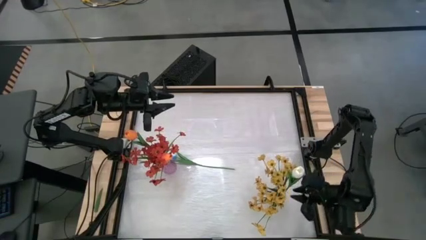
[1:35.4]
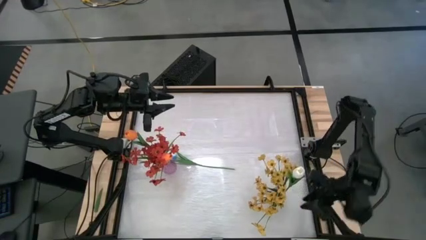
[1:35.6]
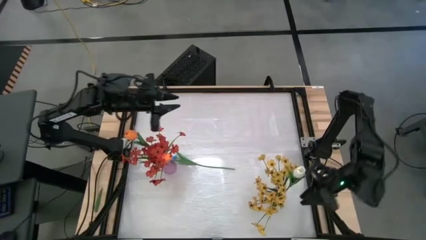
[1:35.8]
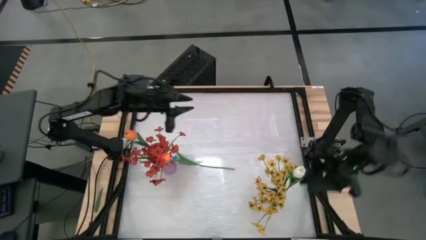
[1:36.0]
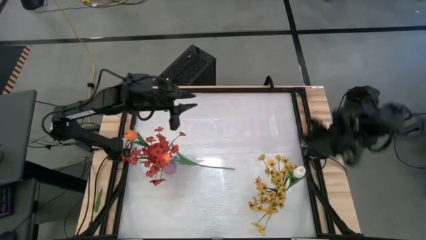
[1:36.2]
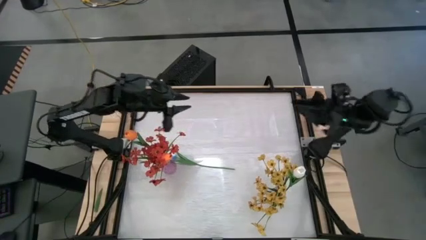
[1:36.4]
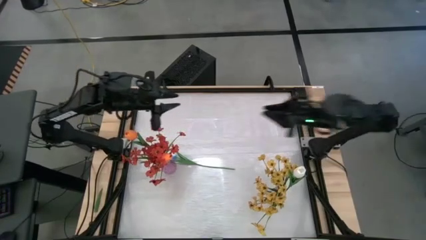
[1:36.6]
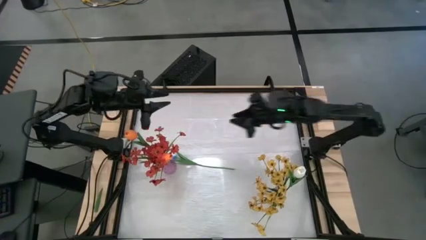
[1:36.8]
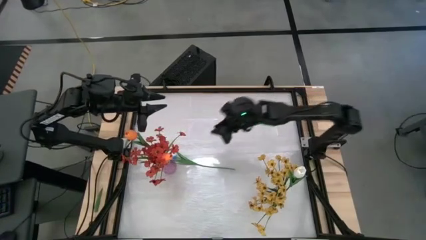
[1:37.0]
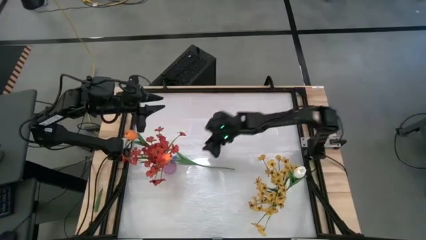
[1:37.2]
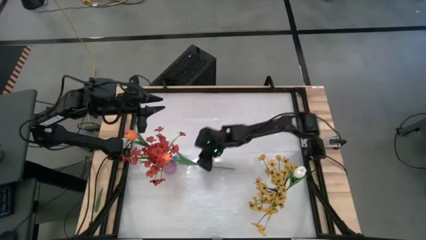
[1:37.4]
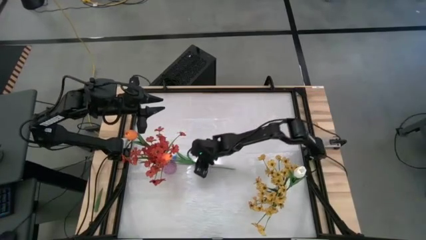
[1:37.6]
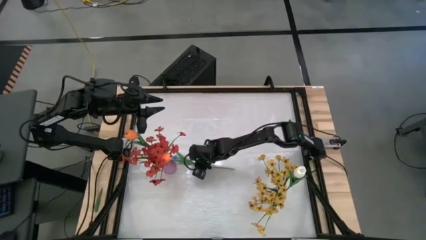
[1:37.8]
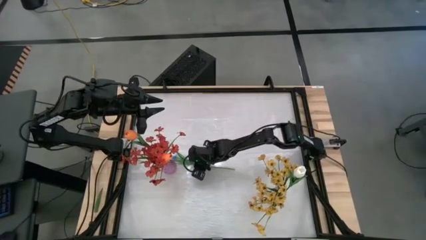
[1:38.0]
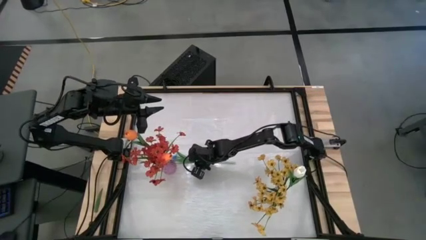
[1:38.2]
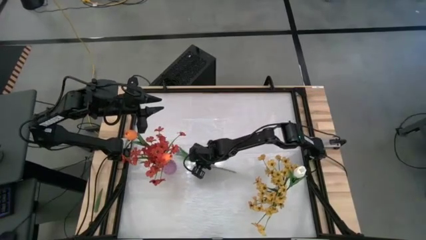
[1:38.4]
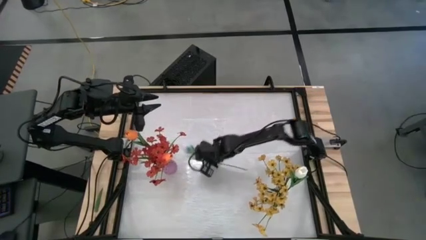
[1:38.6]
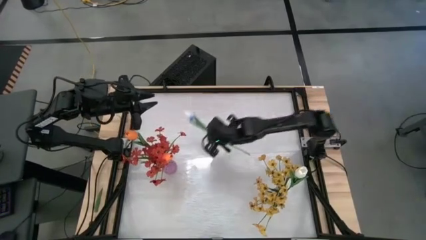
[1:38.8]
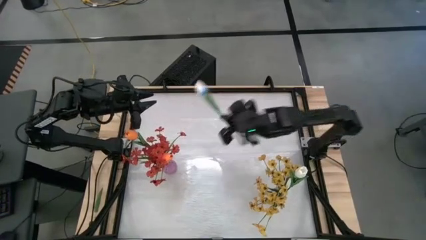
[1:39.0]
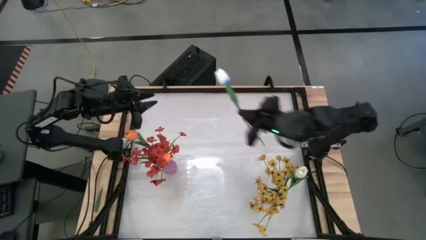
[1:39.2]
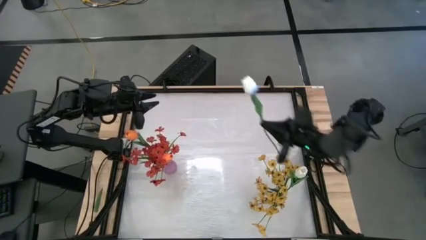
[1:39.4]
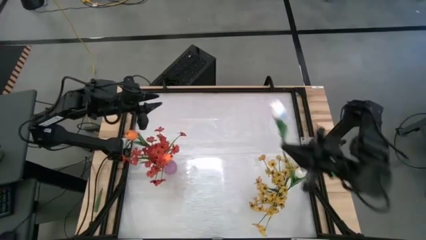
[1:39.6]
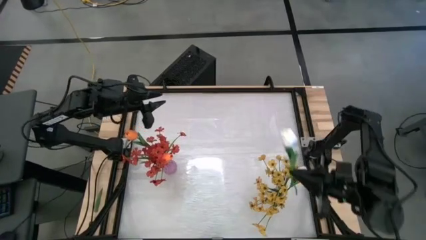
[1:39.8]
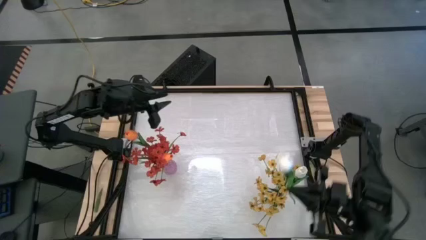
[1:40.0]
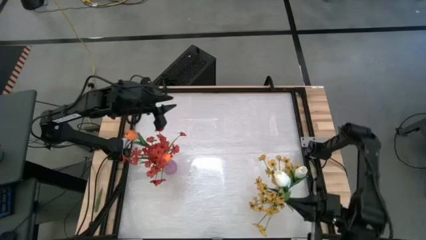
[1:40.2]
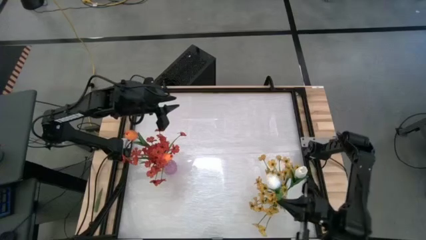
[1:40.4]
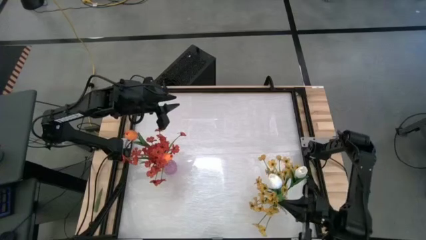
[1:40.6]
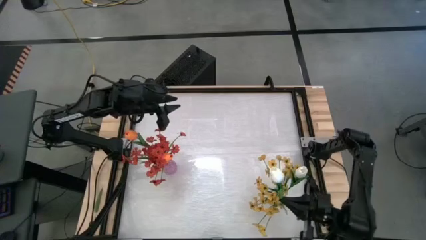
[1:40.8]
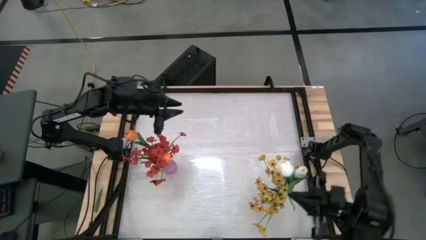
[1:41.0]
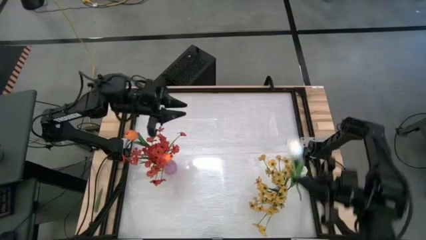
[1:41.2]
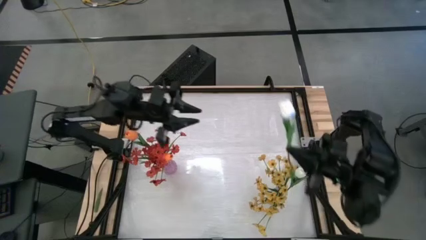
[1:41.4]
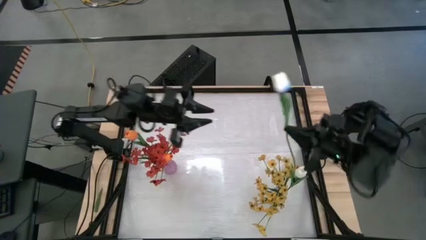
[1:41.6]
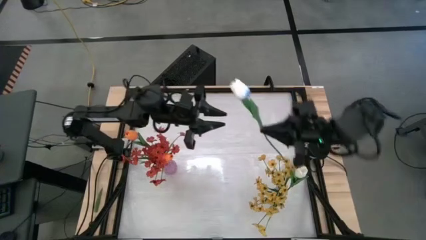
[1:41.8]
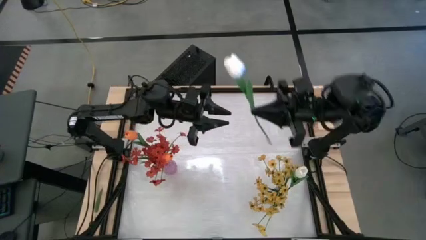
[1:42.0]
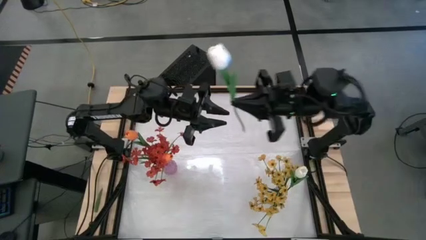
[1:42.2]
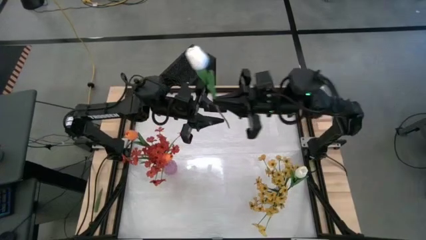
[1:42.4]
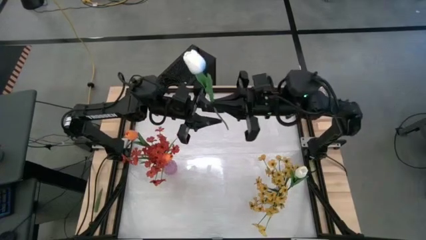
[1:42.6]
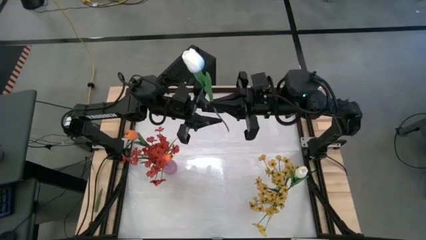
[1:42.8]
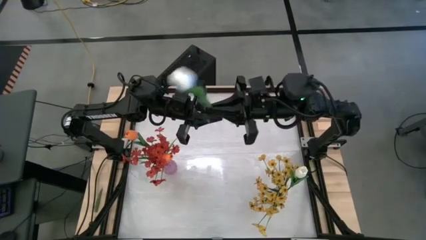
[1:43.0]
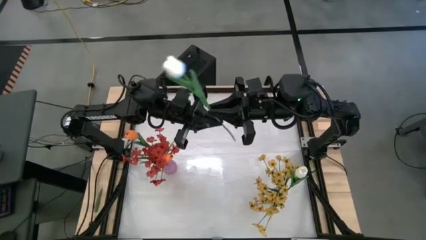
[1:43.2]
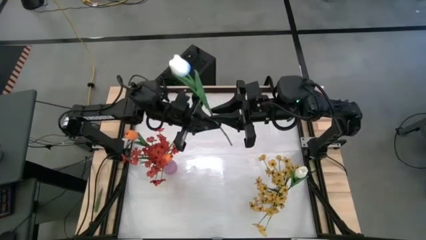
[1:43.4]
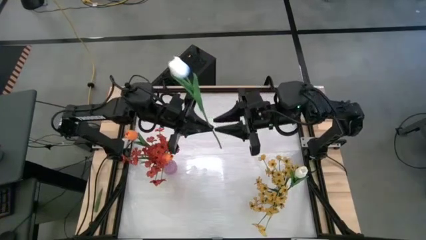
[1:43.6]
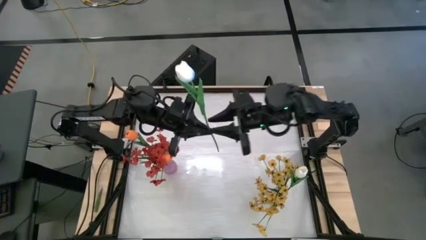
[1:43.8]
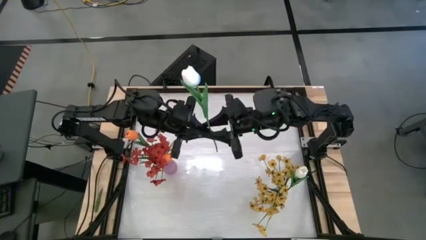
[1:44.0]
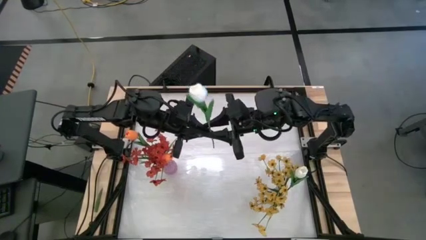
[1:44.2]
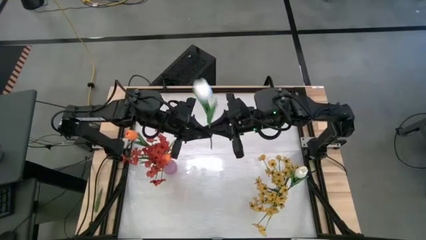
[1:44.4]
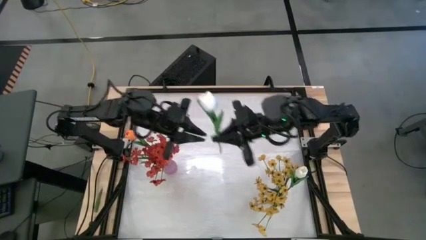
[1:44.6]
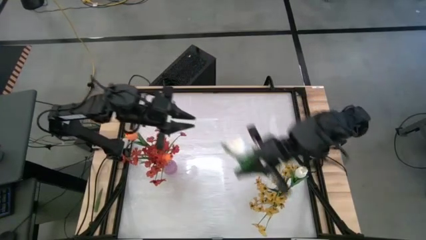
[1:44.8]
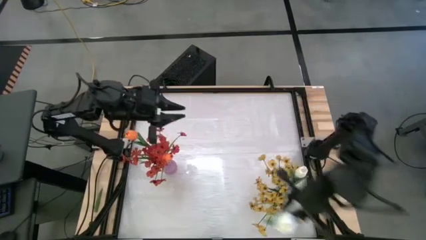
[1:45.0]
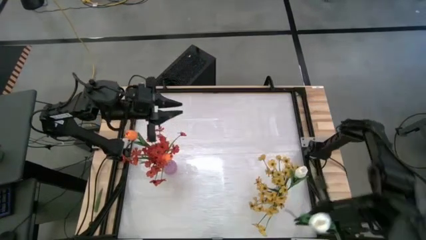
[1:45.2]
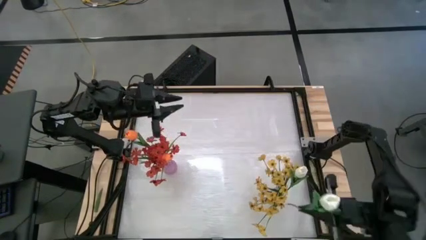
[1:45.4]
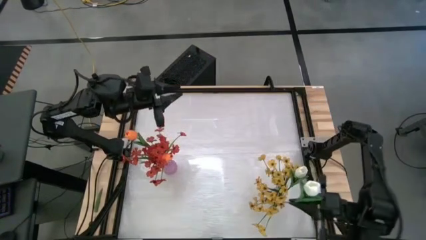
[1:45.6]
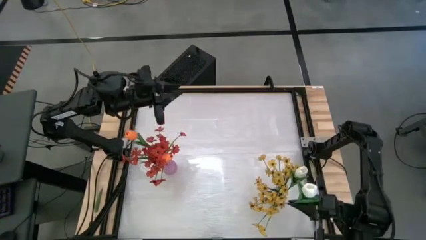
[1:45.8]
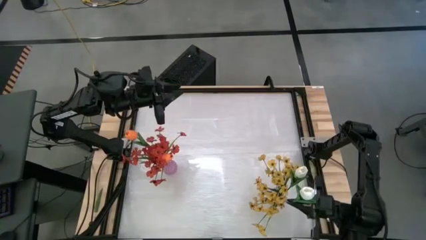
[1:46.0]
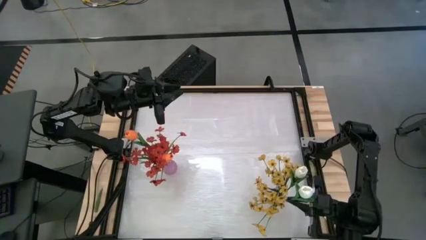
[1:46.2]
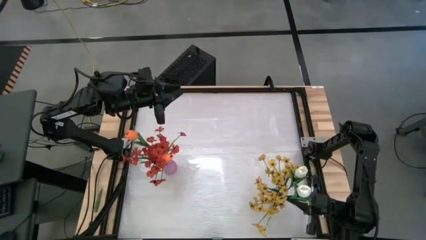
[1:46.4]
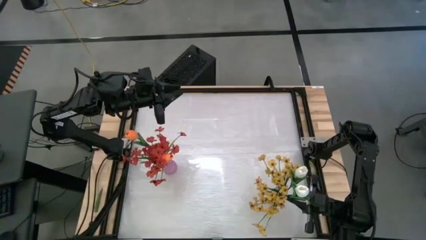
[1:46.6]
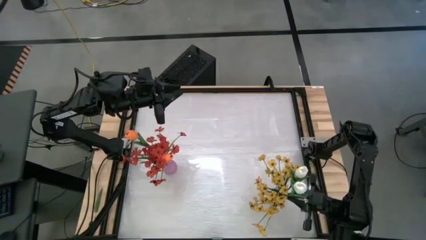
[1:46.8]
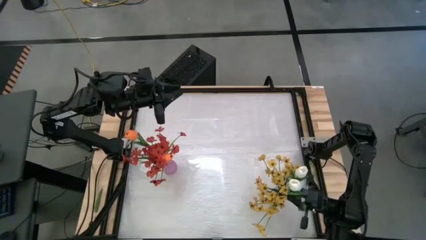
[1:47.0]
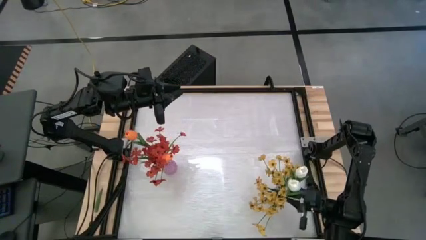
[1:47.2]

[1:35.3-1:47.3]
Task: Sort flowers into vase by color
Put the white flower into the transparent vase
